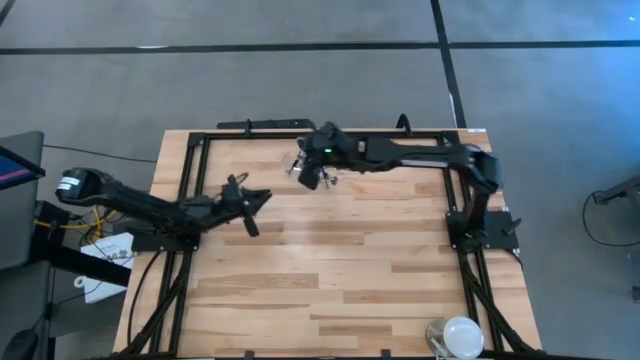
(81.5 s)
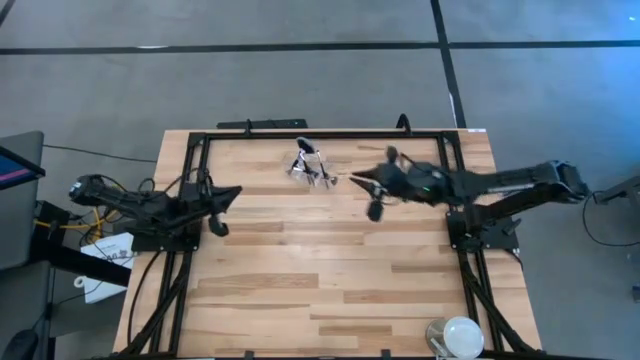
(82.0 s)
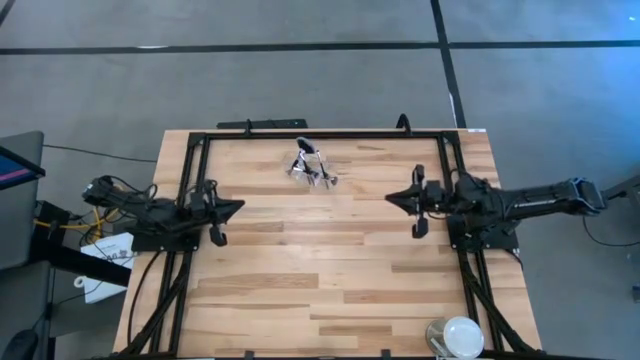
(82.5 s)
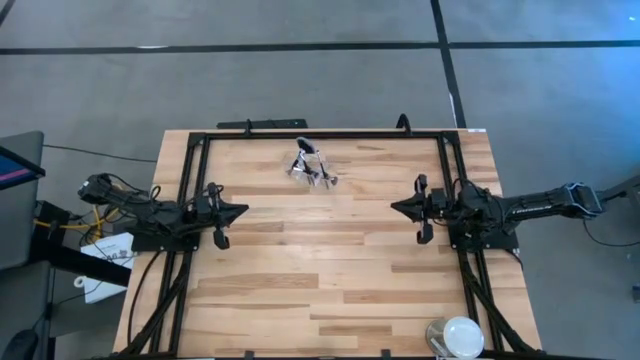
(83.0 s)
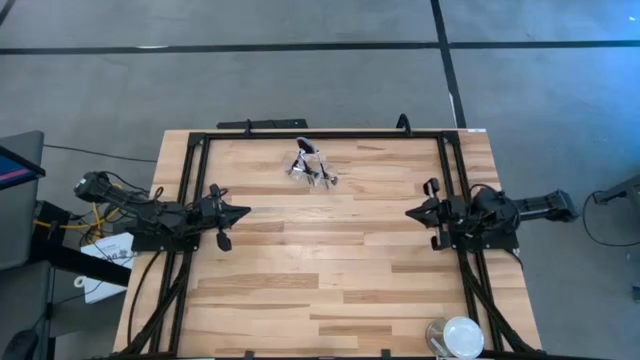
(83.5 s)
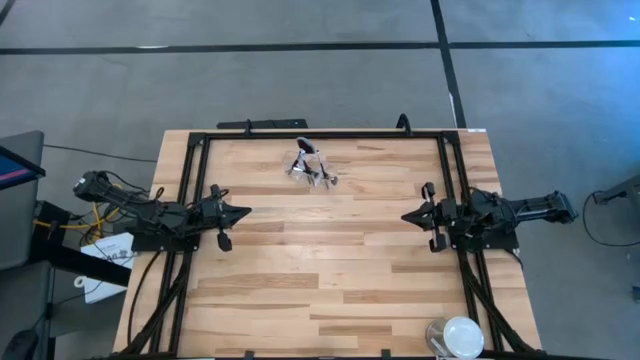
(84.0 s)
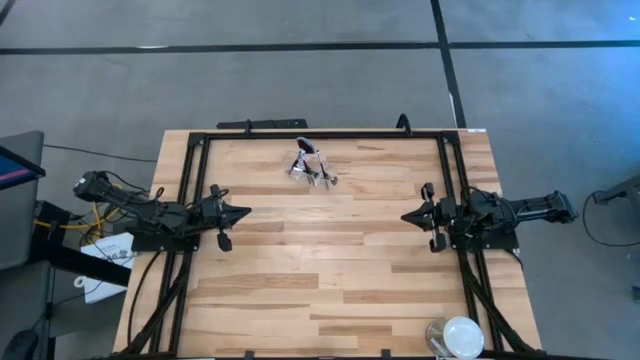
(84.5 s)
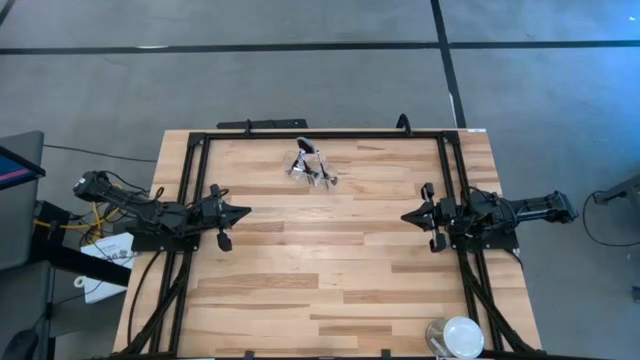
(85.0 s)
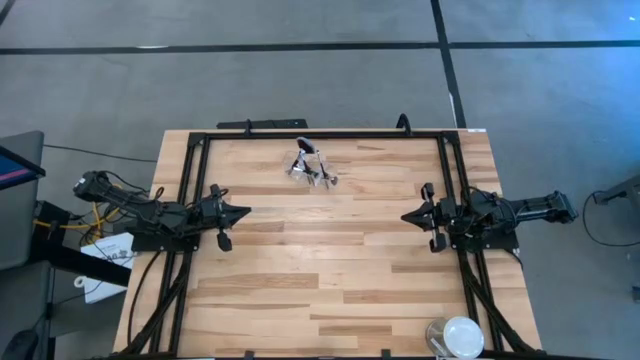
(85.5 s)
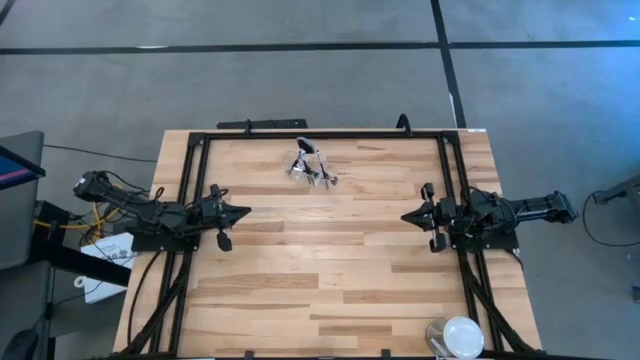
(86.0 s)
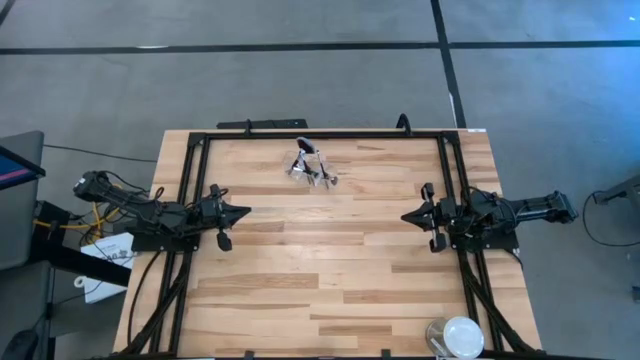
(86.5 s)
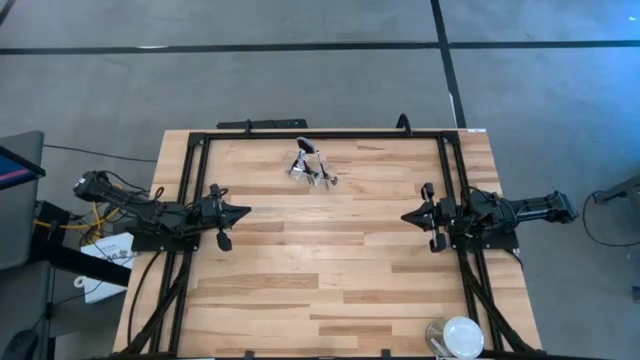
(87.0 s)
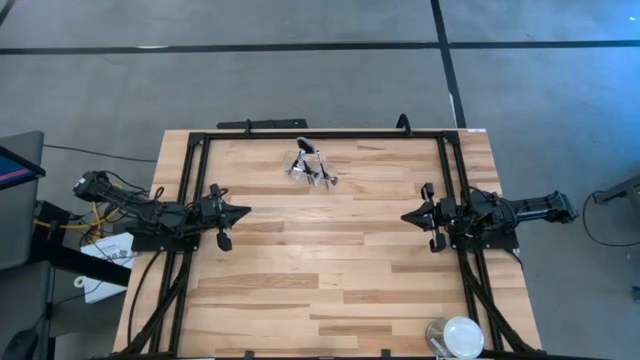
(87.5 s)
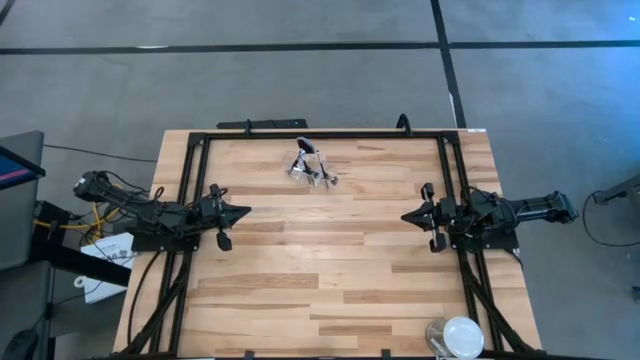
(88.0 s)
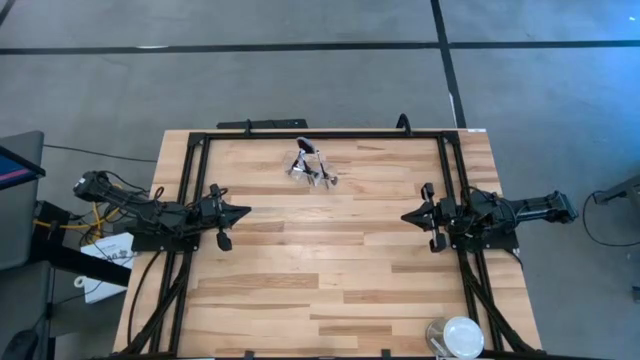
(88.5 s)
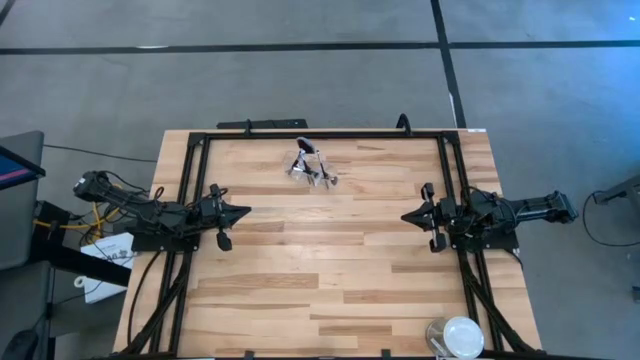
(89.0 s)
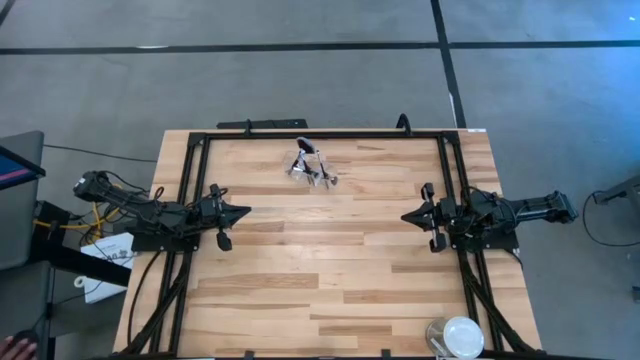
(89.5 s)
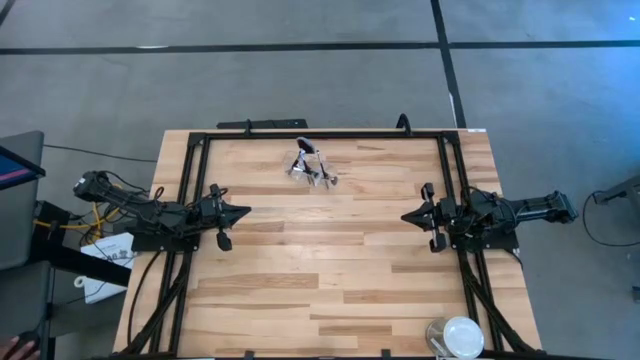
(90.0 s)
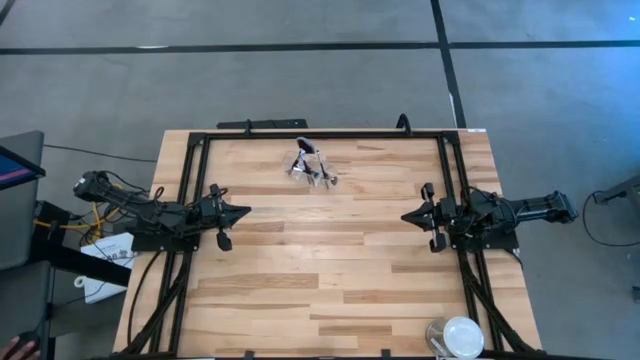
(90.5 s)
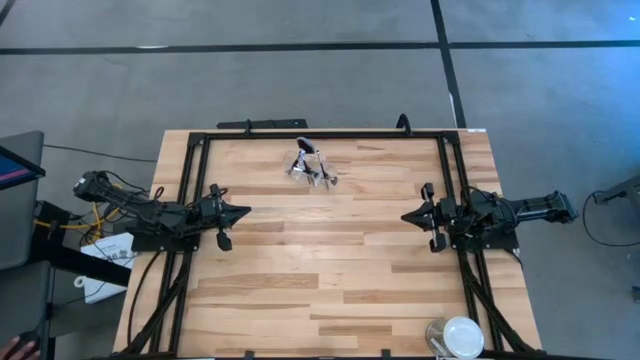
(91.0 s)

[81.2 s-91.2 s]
Task: Sort items
Return to Home Position

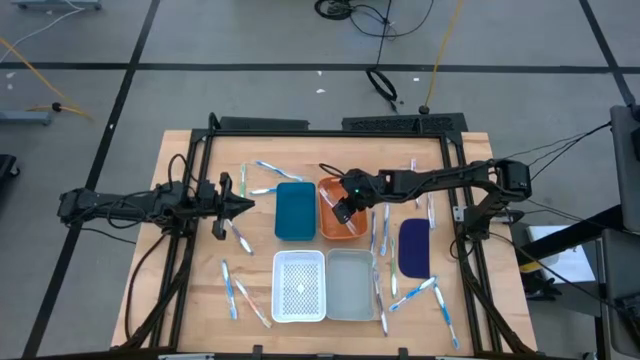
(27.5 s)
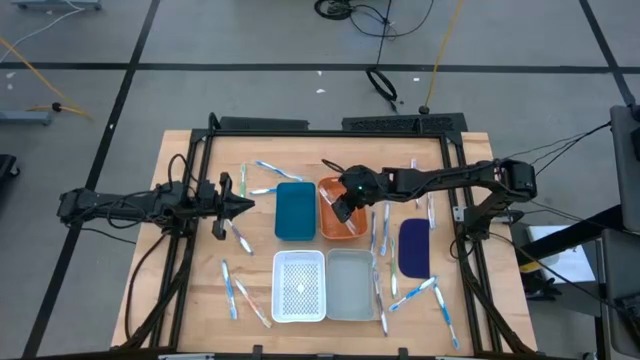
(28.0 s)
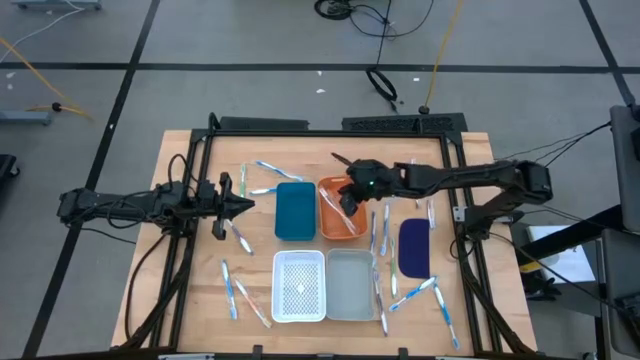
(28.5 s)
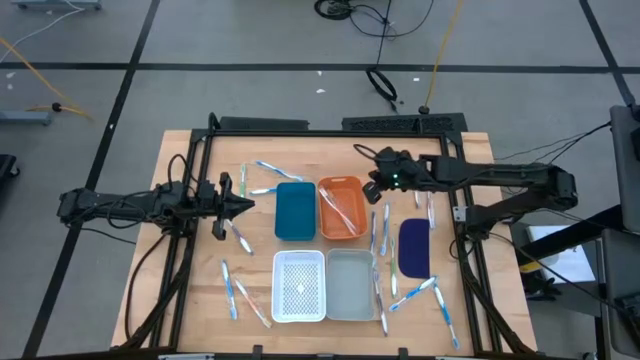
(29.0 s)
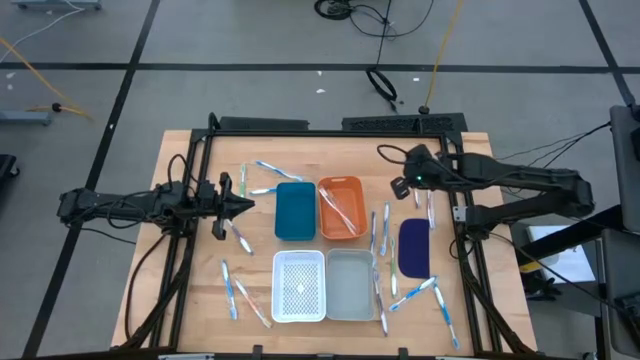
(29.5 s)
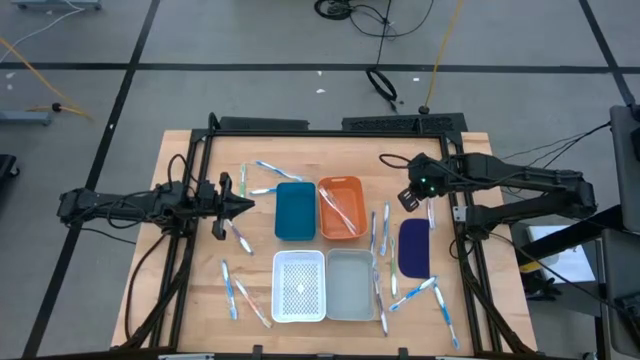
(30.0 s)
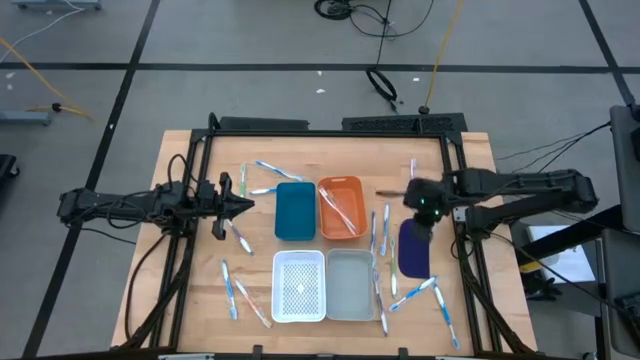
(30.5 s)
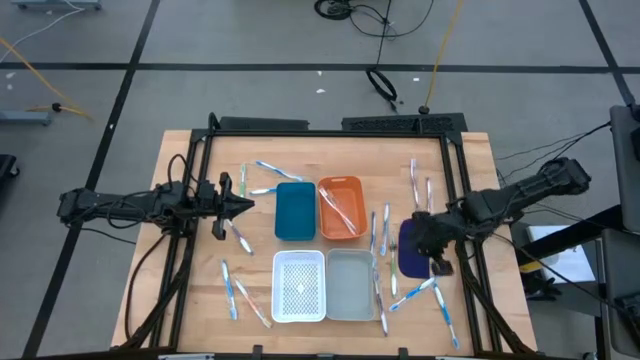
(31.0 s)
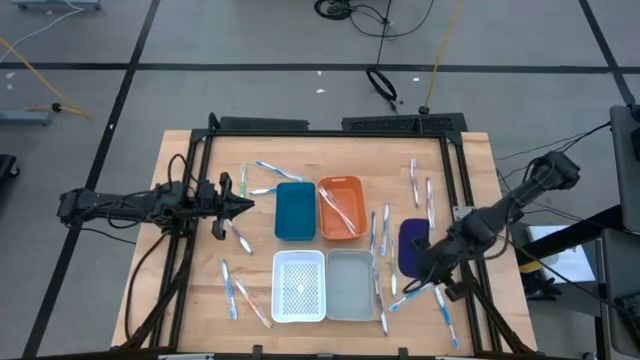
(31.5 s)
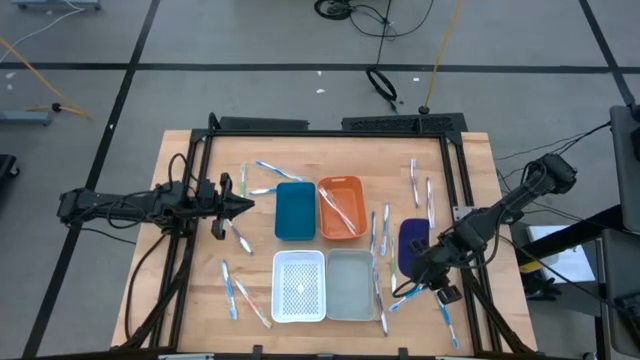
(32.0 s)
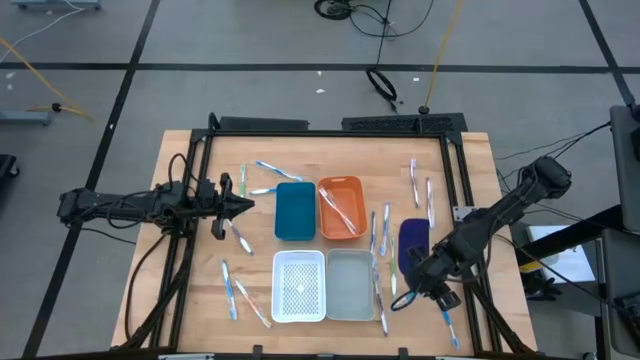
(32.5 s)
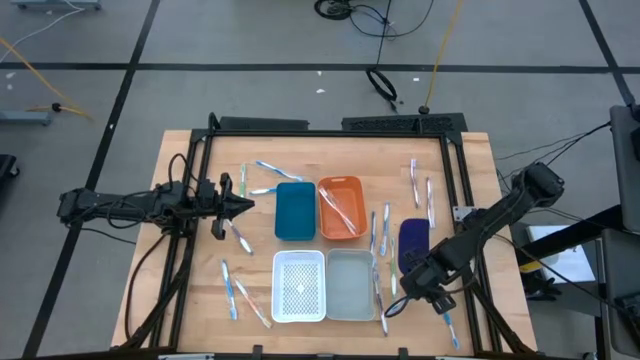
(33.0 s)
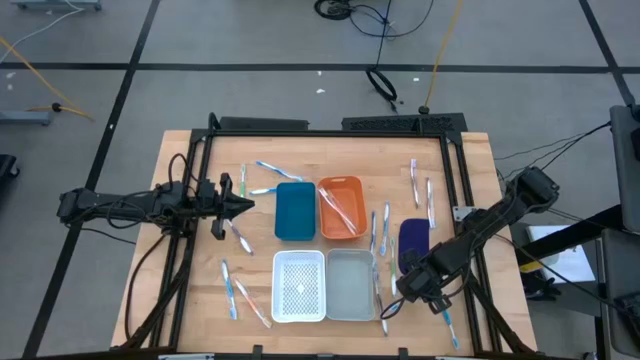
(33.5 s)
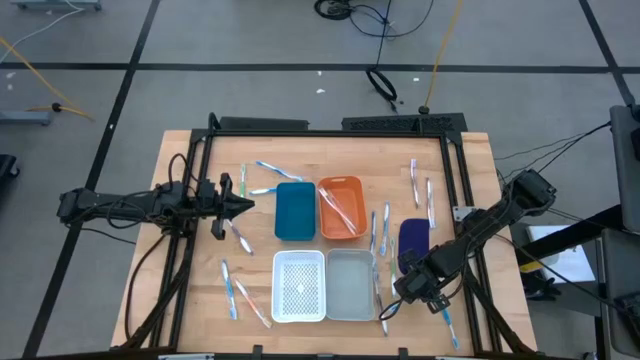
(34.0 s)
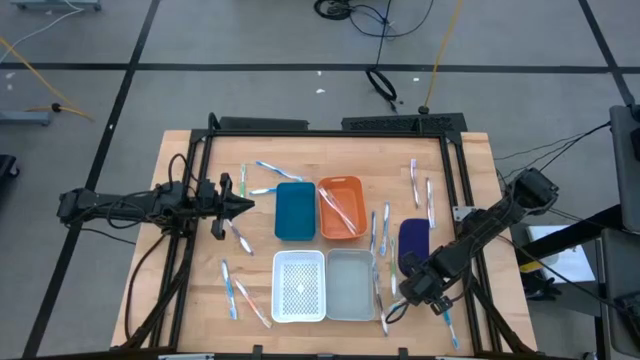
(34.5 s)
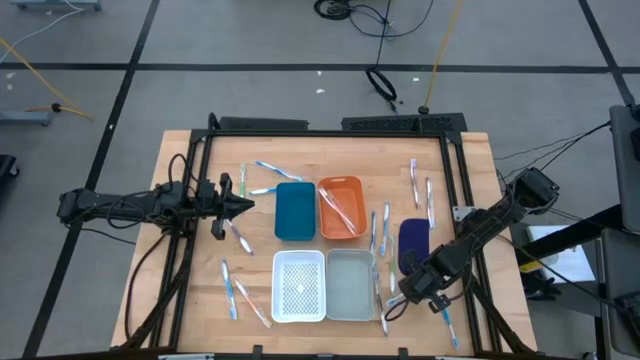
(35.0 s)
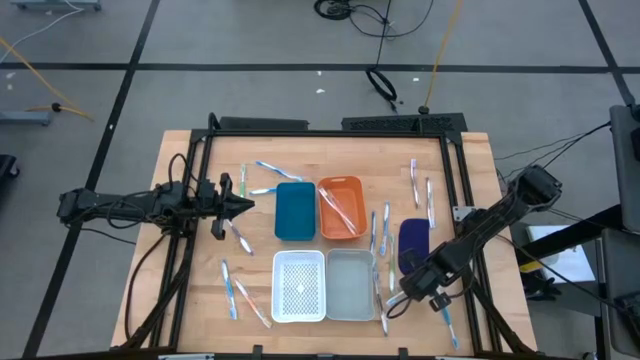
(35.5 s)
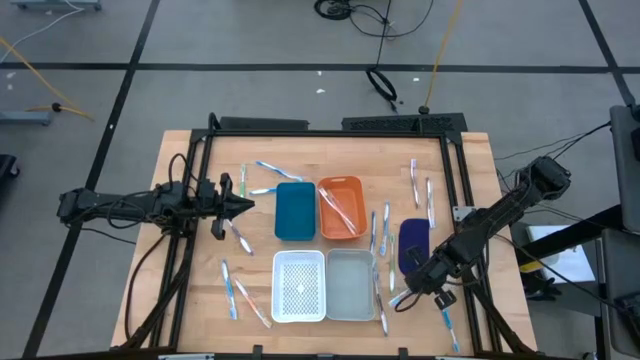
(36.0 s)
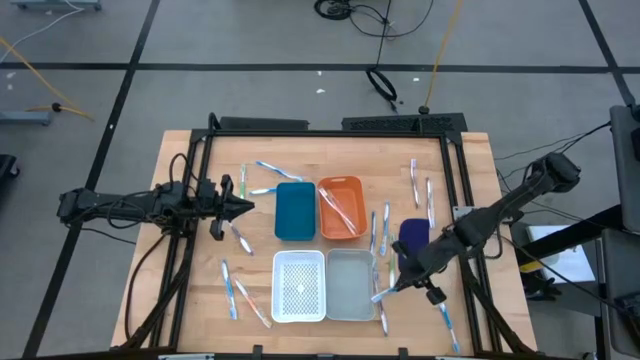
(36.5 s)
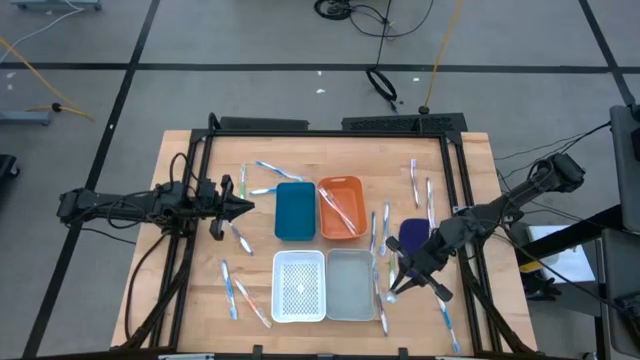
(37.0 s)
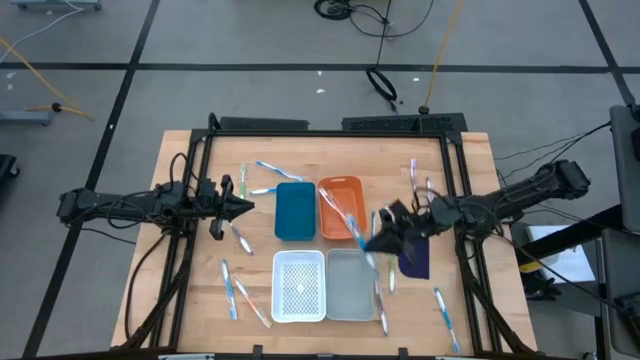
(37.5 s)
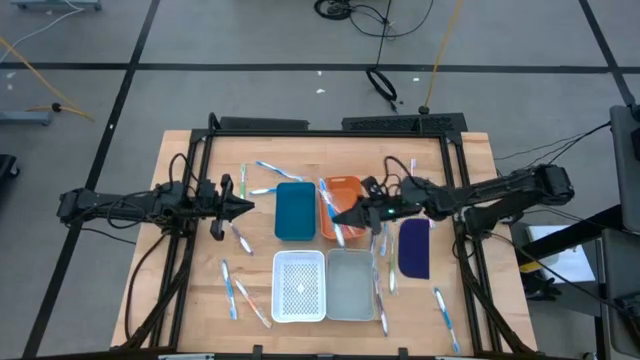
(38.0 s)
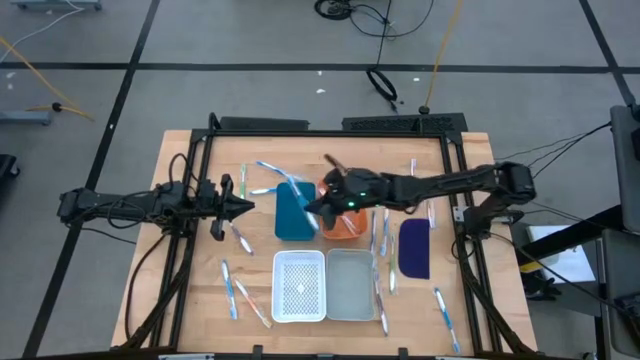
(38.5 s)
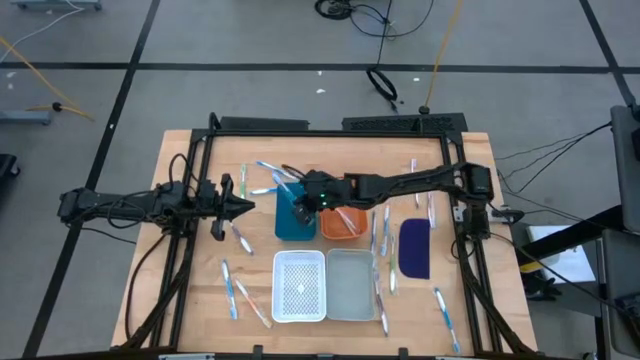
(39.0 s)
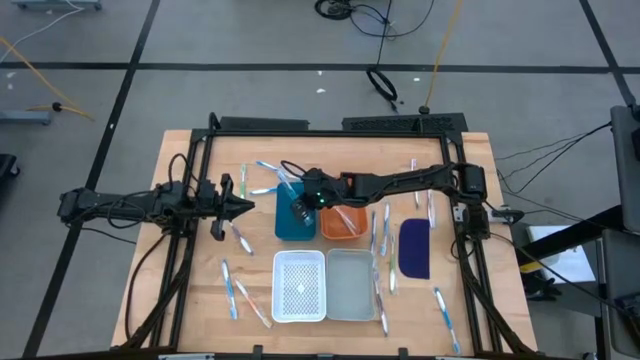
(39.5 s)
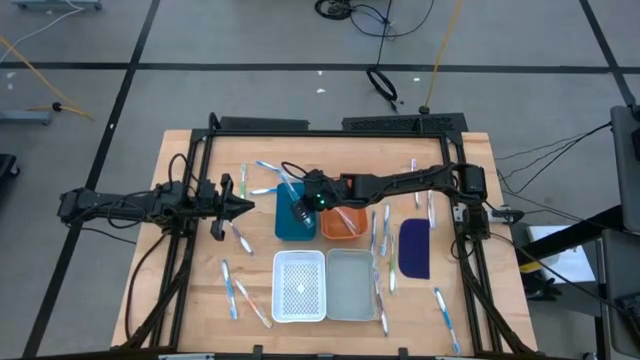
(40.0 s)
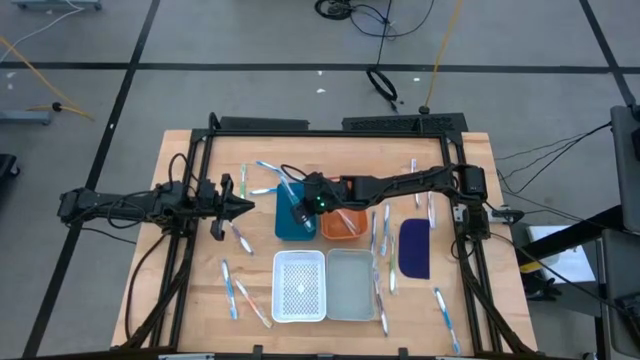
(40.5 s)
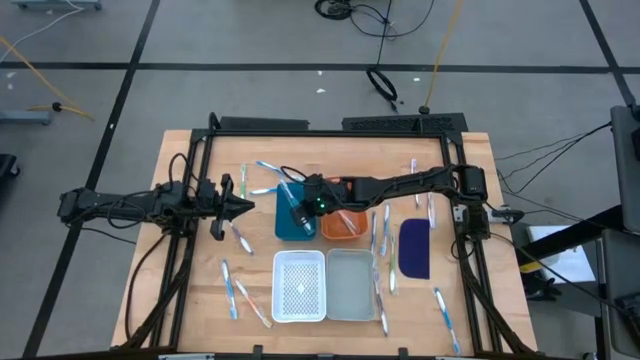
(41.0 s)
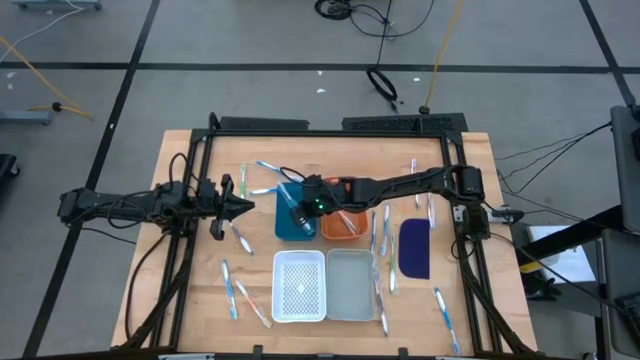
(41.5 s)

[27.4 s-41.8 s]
Task: Pick & Place Toothbrushes
Put the blue toothbrush into the blue bin
